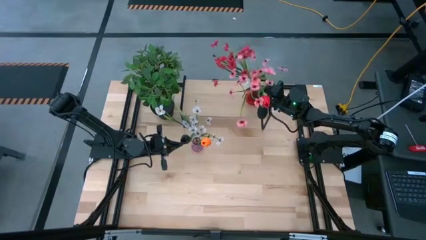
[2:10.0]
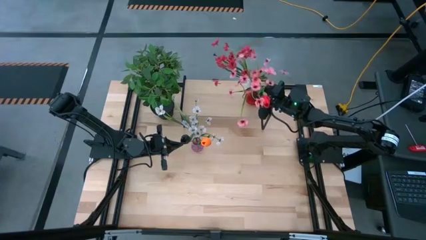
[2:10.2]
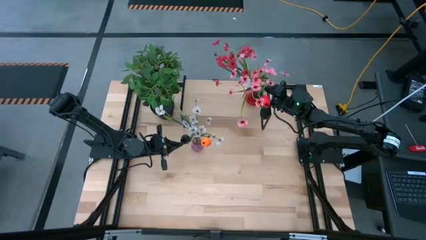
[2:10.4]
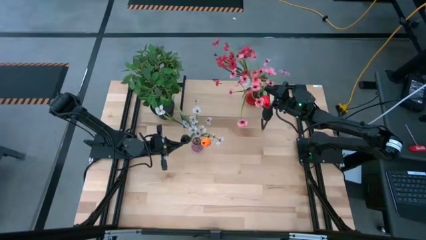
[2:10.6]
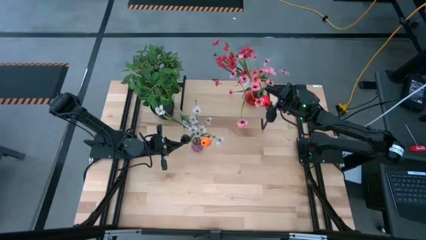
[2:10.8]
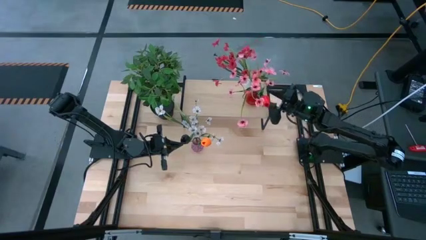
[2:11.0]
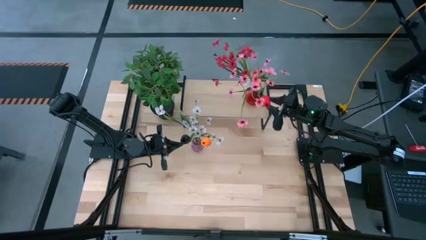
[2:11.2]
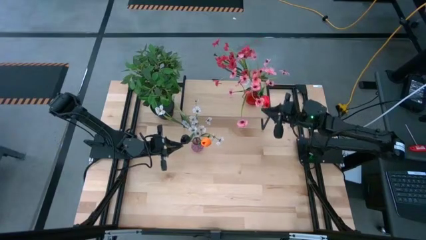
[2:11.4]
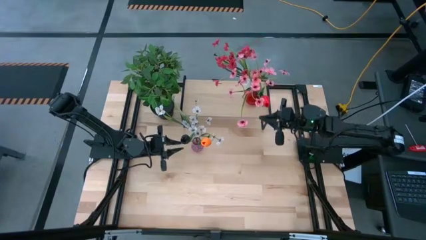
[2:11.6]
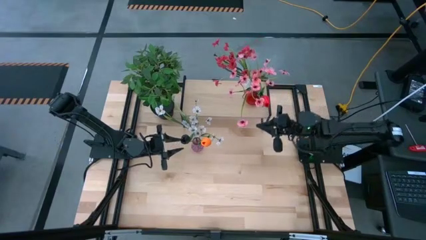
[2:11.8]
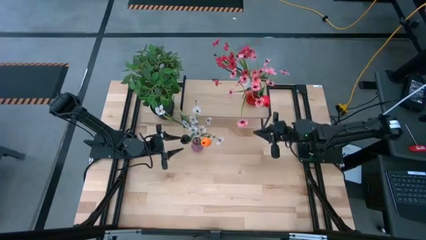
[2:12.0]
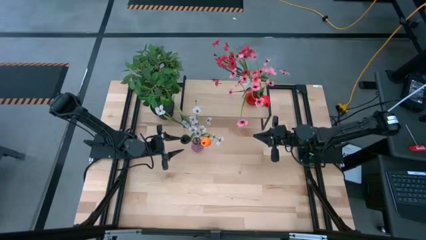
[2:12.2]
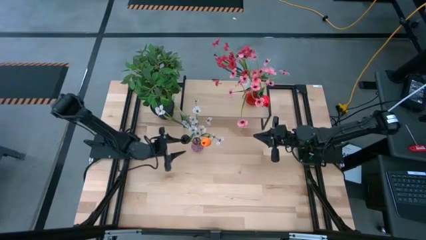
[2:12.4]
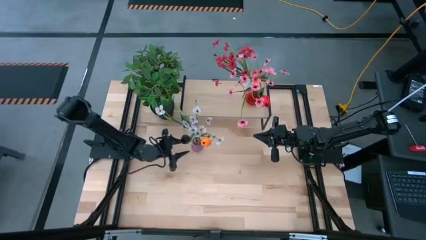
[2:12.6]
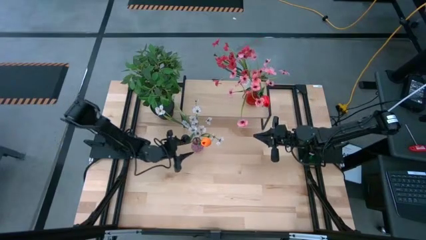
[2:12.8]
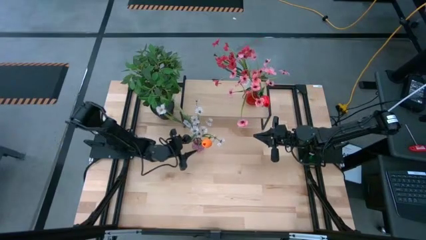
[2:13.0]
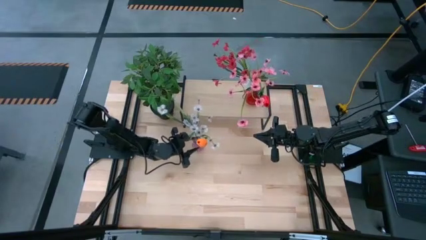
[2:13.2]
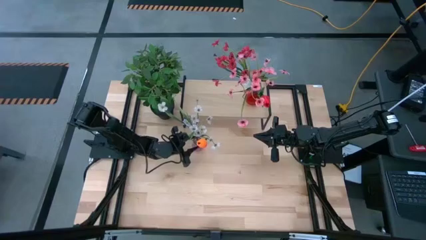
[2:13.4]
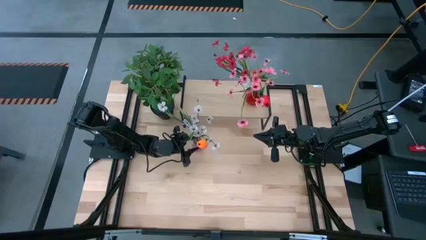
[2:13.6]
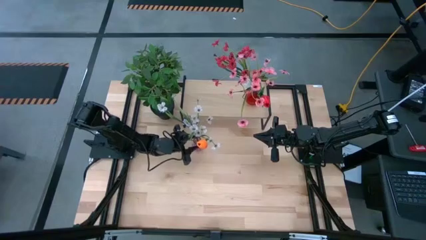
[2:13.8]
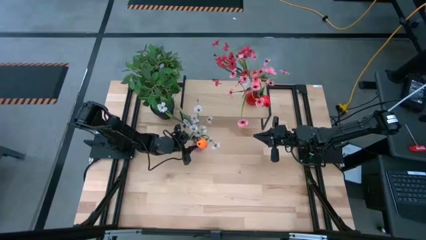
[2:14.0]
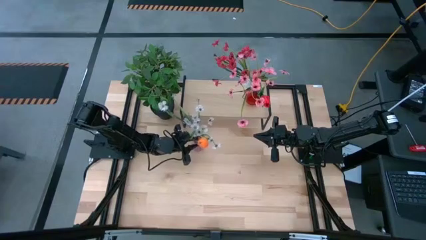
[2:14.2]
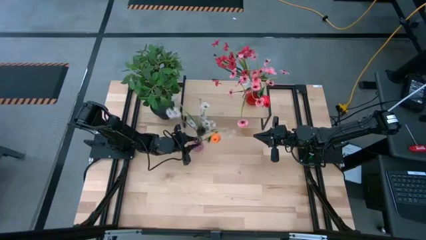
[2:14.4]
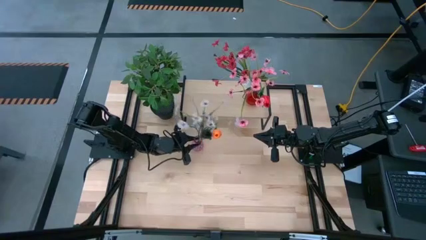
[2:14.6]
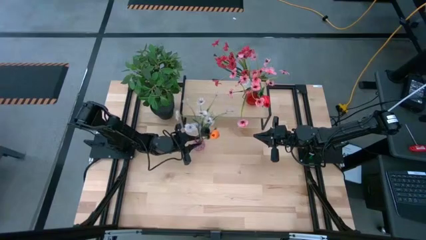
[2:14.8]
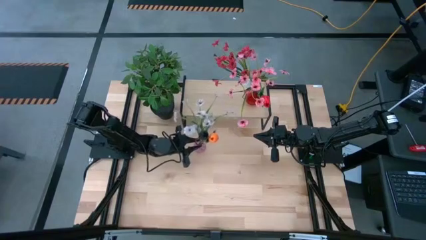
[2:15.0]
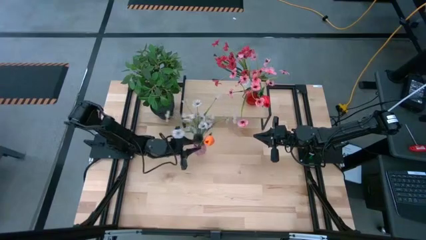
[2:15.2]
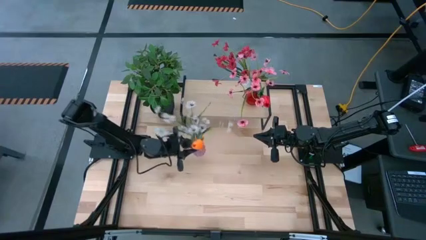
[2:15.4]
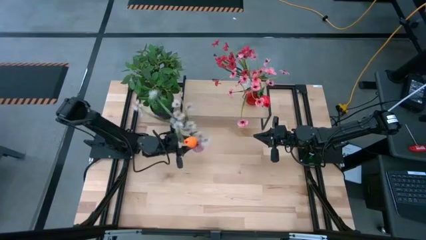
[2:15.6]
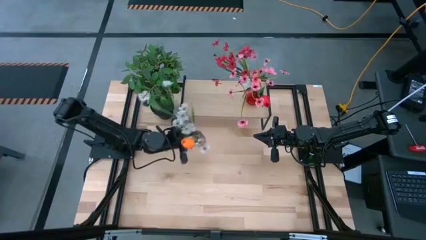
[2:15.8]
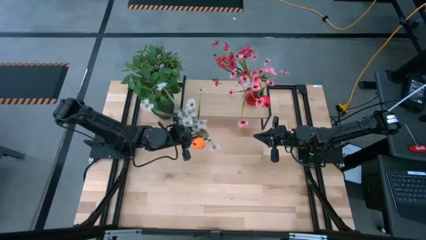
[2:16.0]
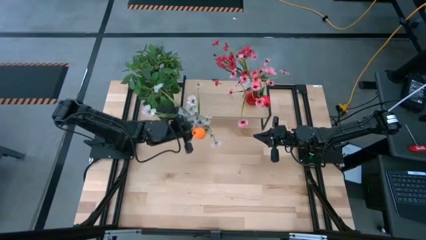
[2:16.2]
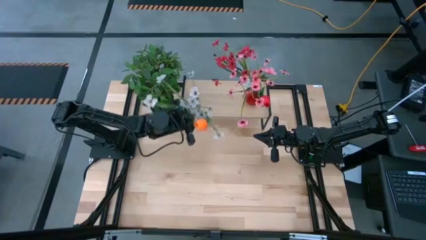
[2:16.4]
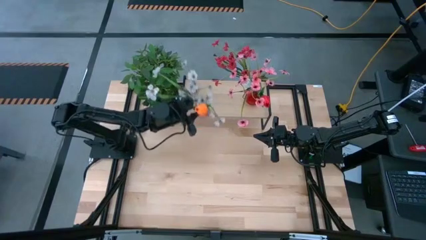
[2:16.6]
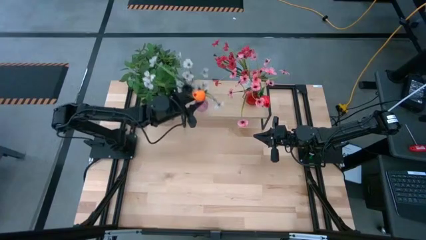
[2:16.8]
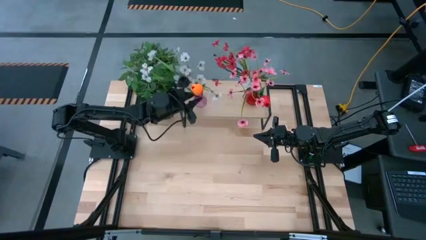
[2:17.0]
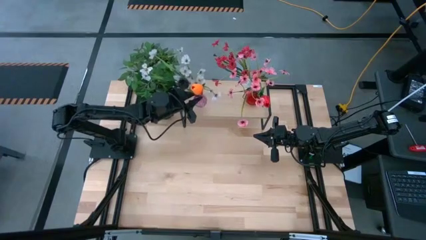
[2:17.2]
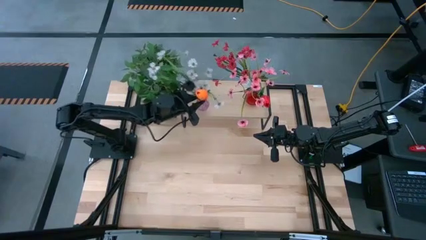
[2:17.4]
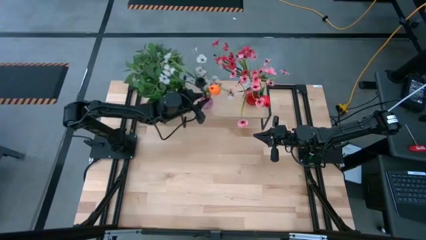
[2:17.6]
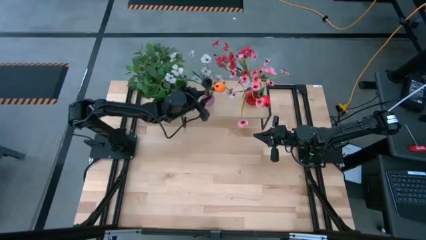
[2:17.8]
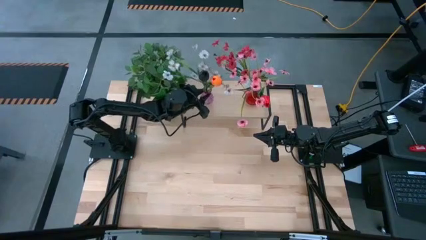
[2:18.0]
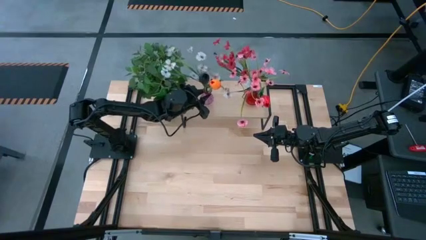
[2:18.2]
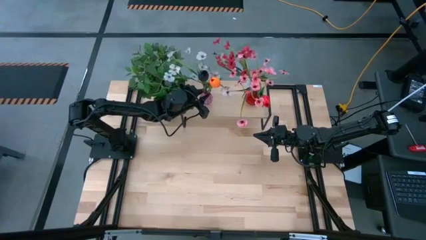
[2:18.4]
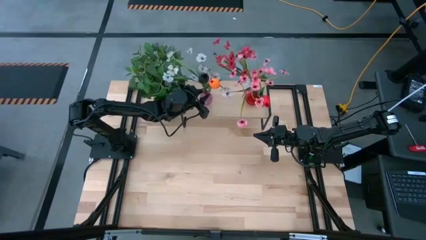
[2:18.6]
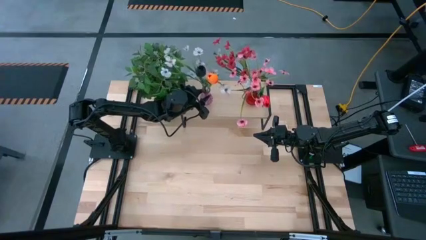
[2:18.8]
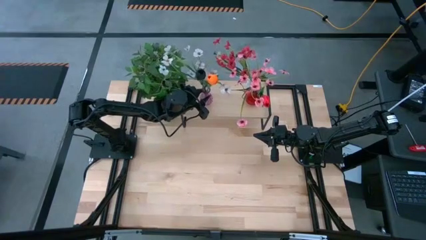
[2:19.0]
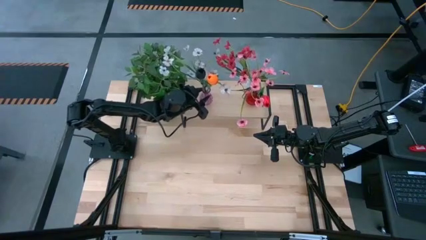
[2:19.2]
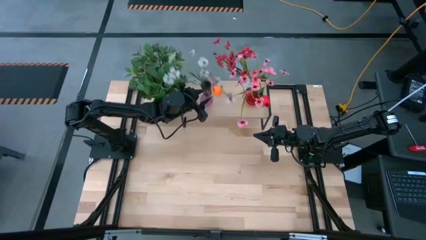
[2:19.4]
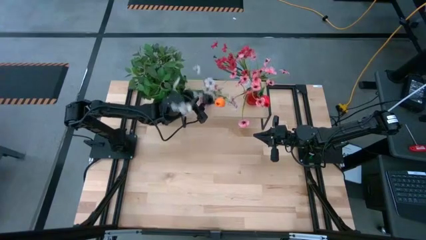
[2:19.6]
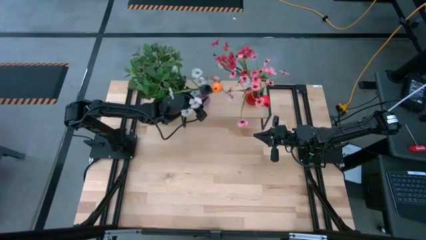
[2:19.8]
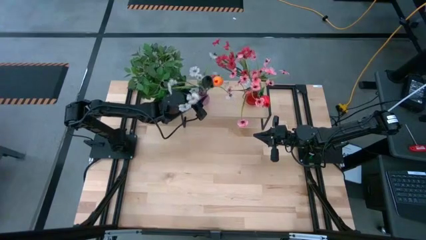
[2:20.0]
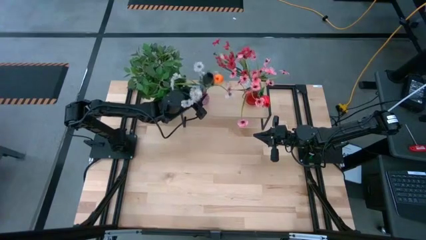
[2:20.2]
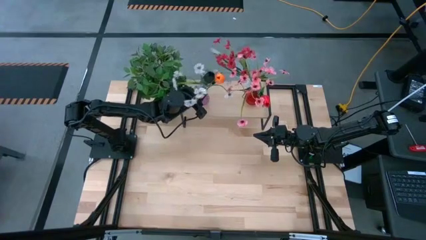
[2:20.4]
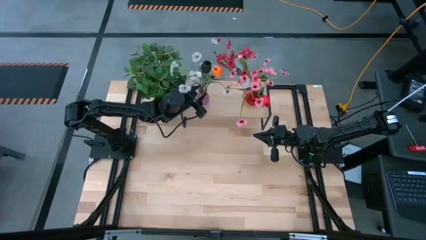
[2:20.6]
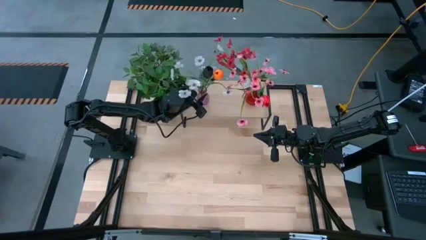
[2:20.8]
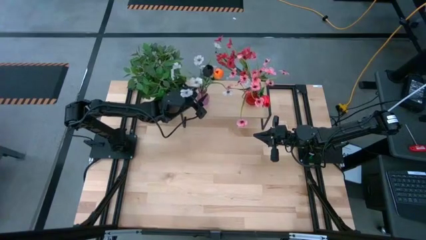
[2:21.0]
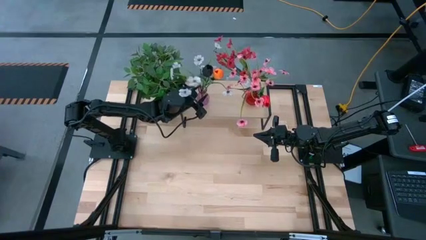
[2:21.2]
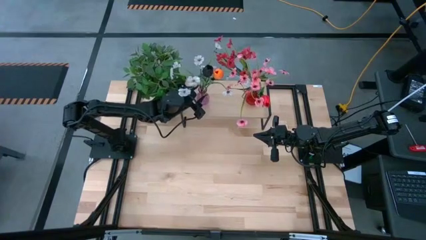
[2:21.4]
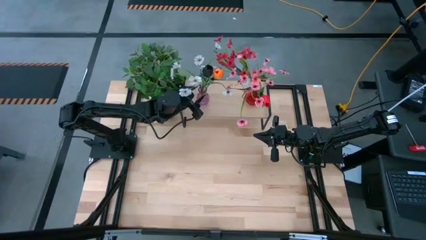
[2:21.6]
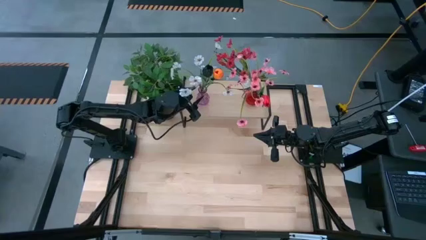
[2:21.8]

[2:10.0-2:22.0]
Task: Pick and place flowers into a vace then onto a shelf
Put the purple vase with flowers on the shelf

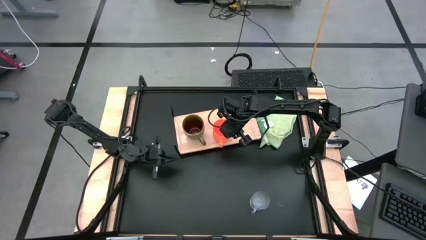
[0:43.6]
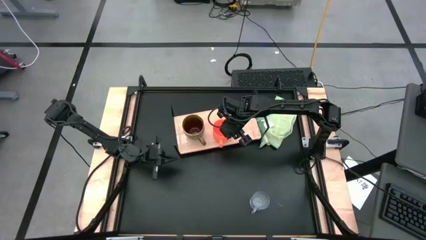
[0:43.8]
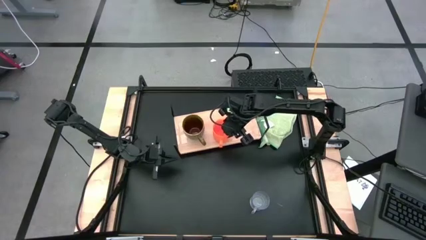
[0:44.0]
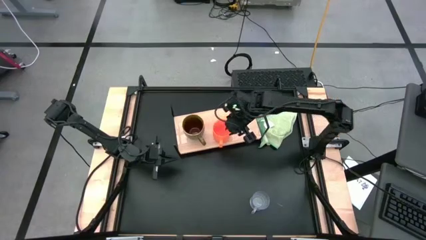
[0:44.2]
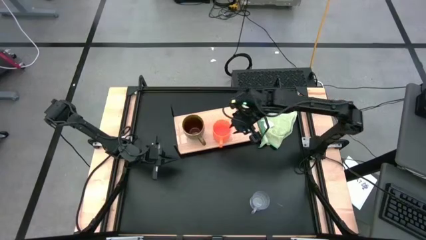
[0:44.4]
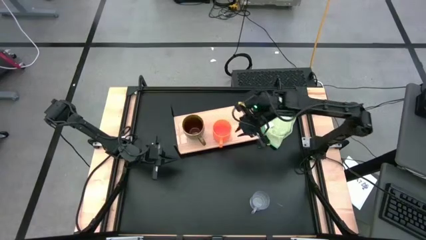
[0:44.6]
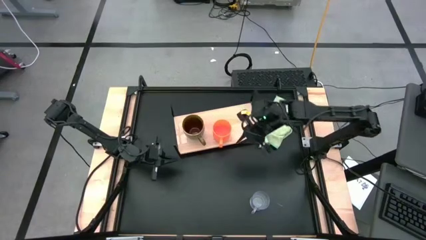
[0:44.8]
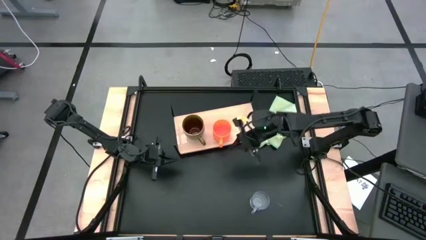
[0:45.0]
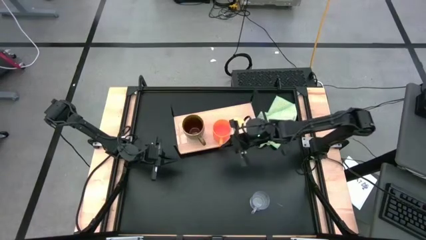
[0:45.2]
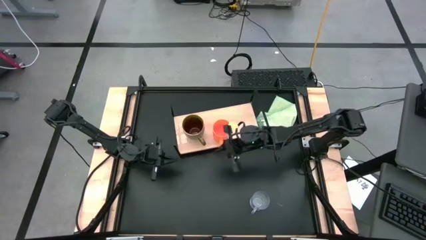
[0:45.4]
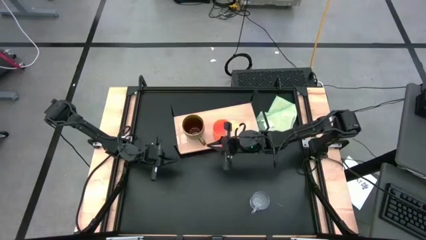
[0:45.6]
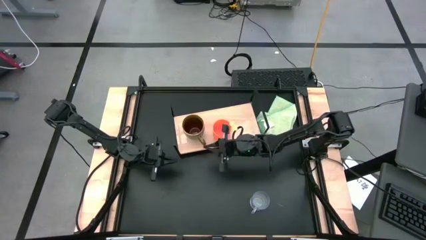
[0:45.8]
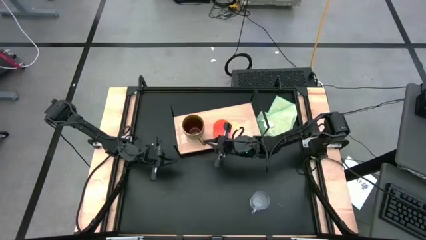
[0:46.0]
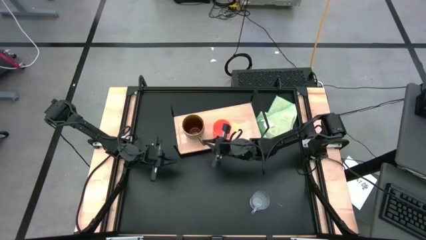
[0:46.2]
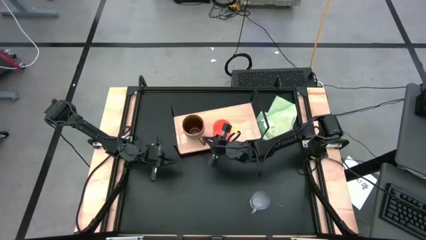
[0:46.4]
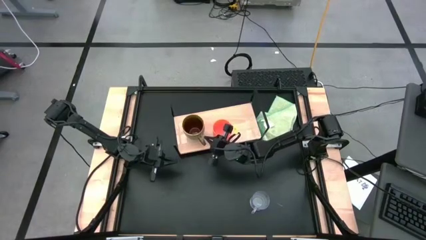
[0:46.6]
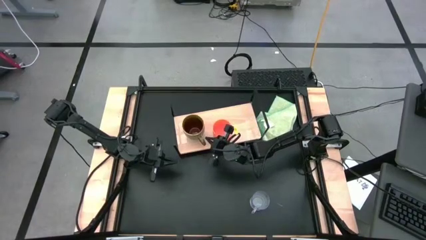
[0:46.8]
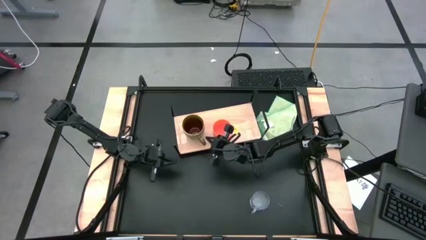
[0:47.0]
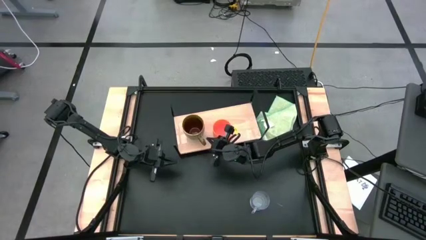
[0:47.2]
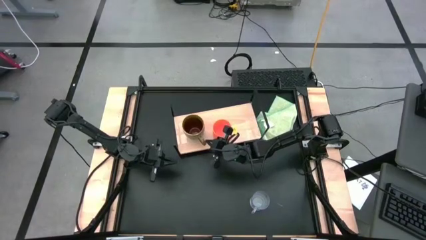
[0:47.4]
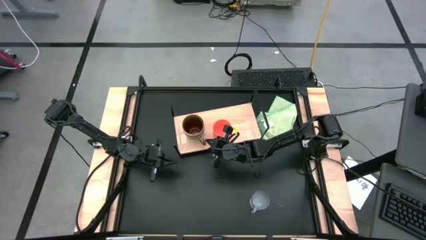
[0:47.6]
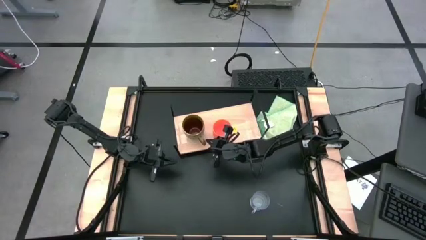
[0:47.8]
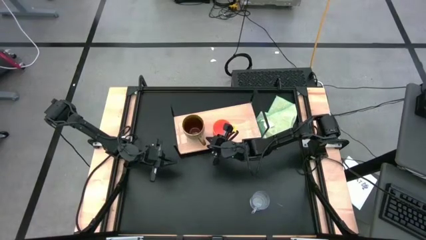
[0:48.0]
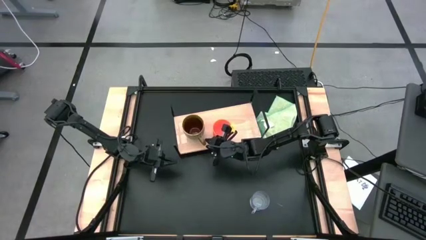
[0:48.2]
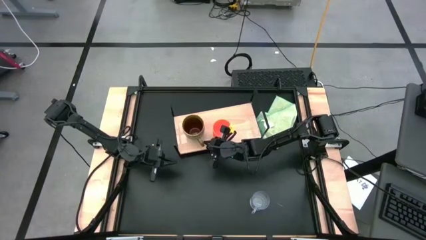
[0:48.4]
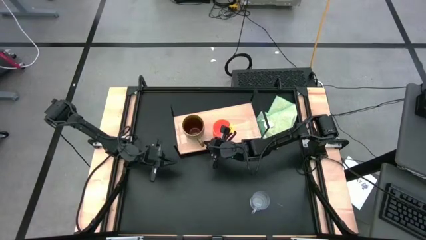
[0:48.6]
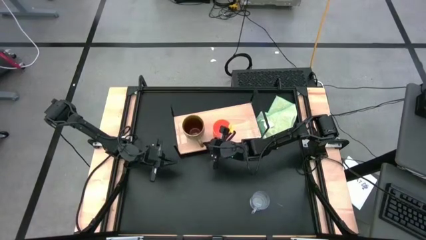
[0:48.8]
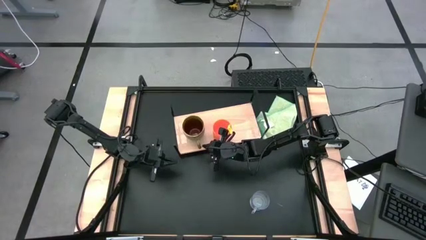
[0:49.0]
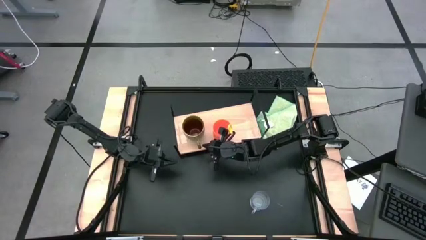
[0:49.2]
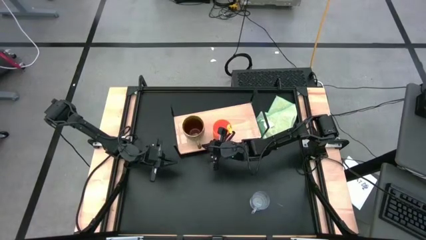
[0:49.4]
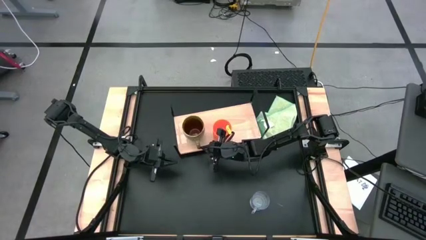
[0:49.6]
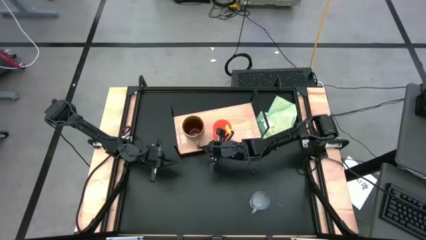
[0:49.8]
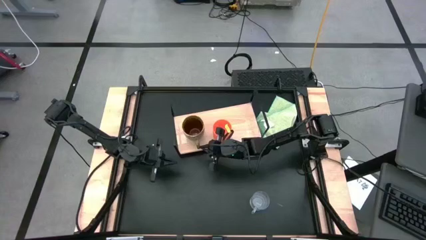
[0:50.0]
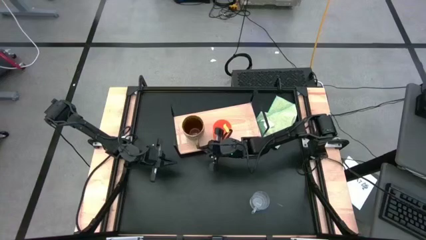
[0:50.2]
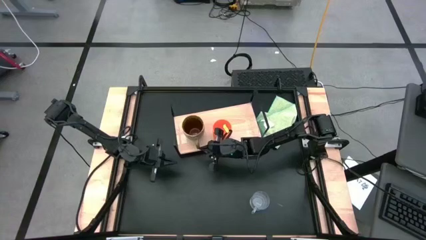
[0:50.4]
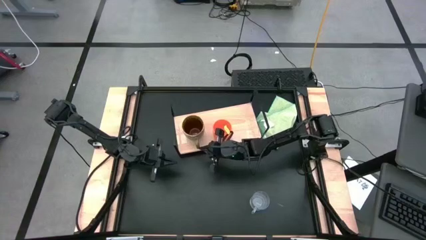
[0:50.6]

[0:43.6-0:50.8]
Task: Stack small to large cups/mugs on shelf
Adjust the dark green mug on the shelf
